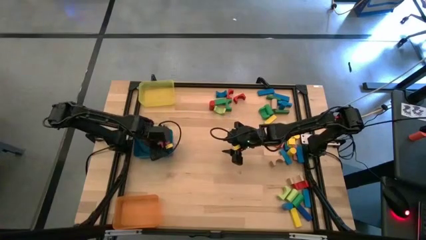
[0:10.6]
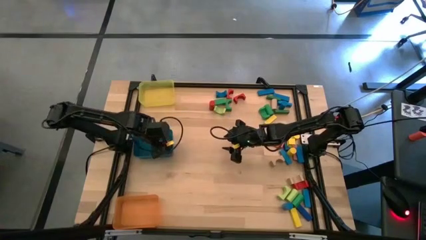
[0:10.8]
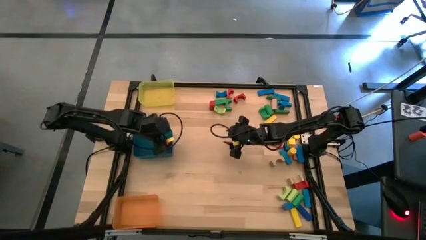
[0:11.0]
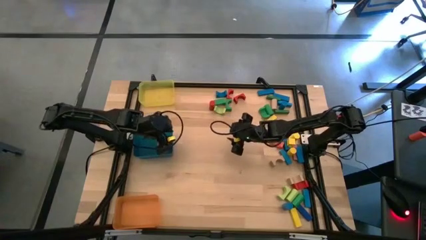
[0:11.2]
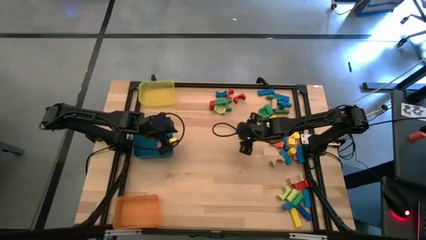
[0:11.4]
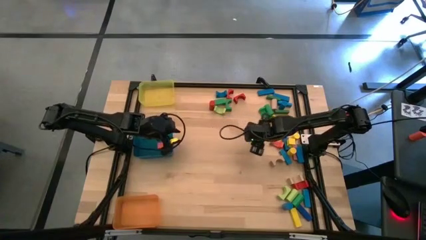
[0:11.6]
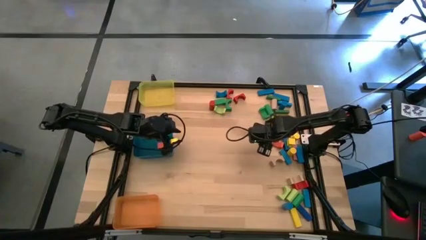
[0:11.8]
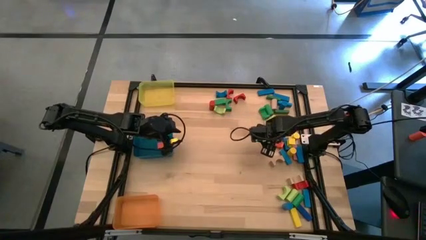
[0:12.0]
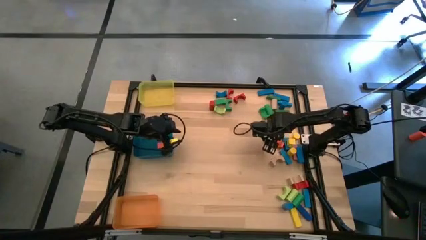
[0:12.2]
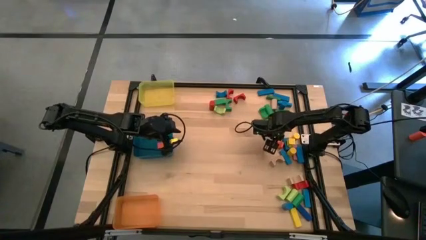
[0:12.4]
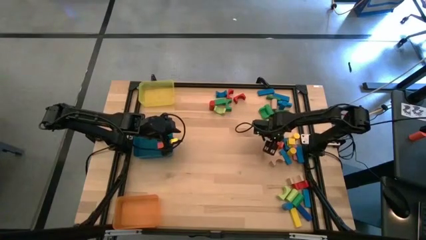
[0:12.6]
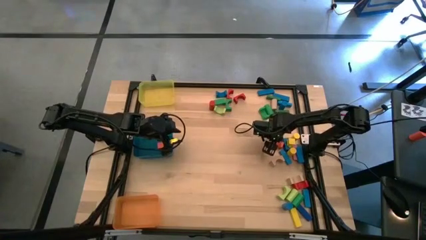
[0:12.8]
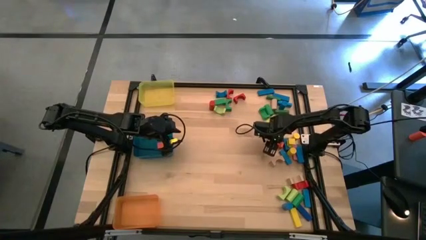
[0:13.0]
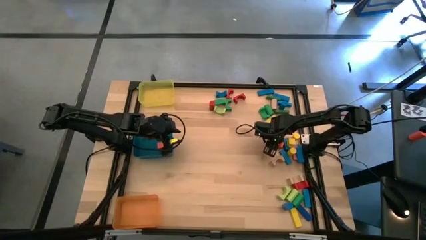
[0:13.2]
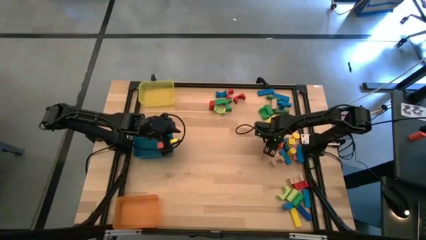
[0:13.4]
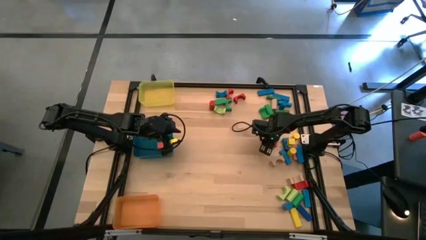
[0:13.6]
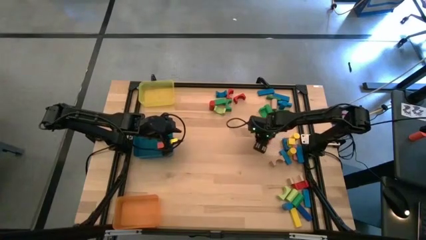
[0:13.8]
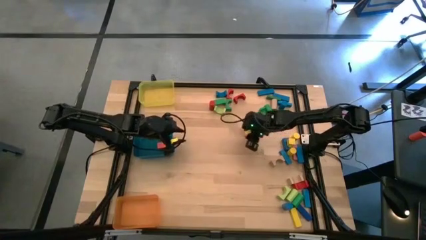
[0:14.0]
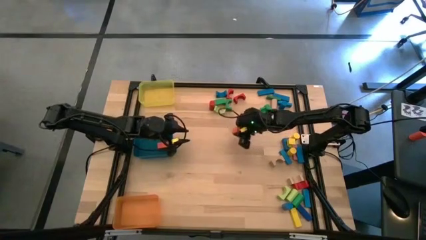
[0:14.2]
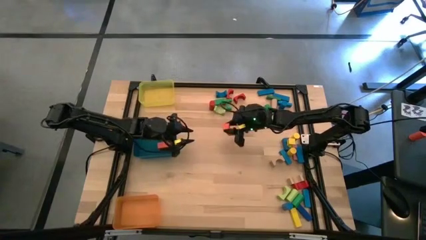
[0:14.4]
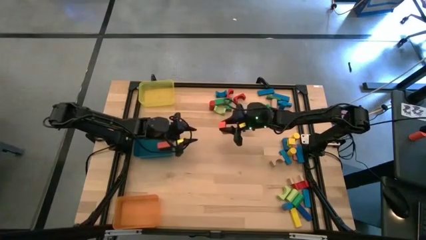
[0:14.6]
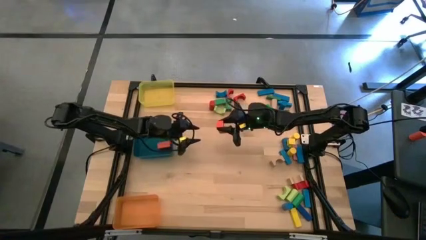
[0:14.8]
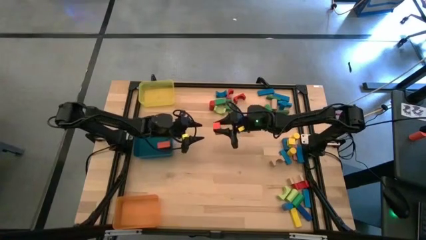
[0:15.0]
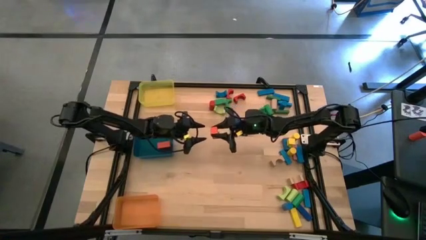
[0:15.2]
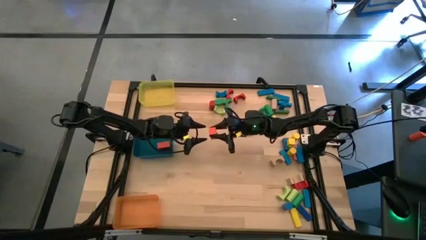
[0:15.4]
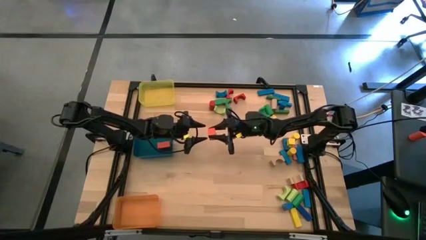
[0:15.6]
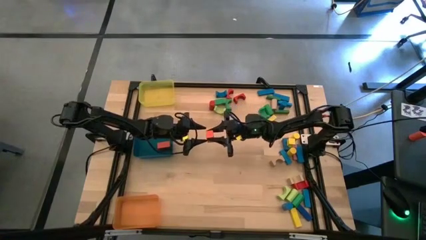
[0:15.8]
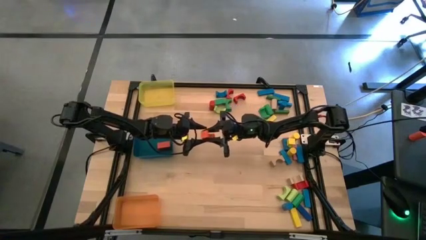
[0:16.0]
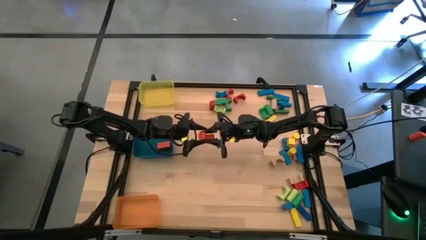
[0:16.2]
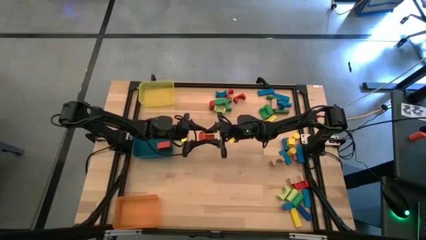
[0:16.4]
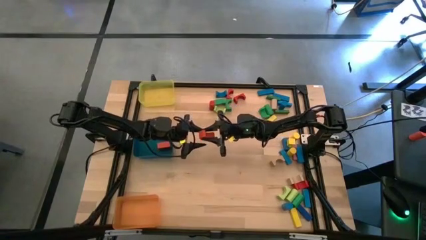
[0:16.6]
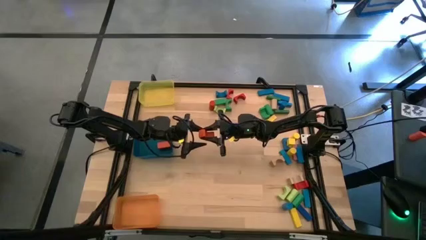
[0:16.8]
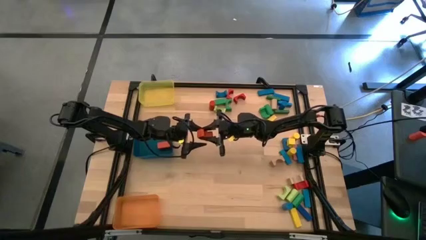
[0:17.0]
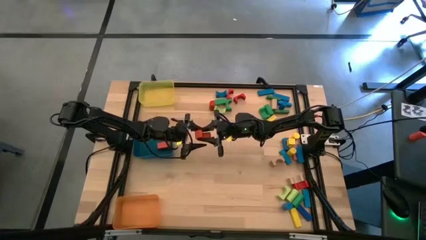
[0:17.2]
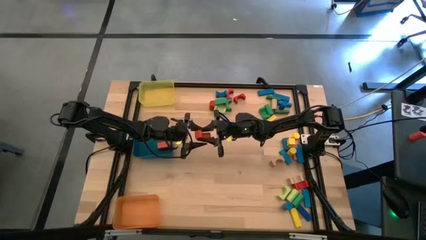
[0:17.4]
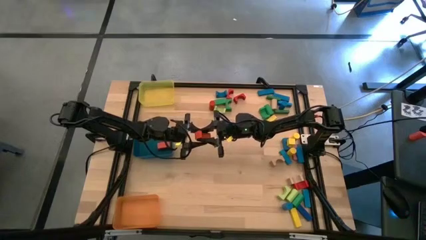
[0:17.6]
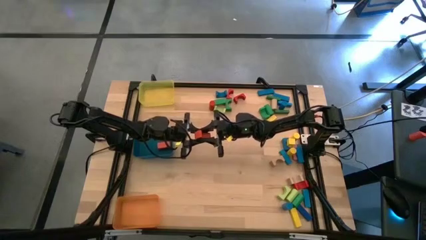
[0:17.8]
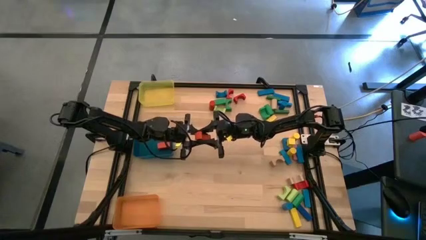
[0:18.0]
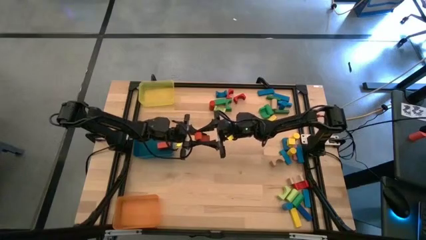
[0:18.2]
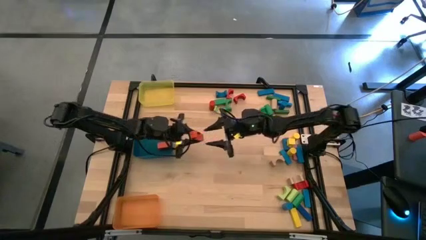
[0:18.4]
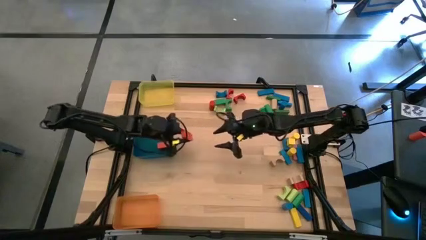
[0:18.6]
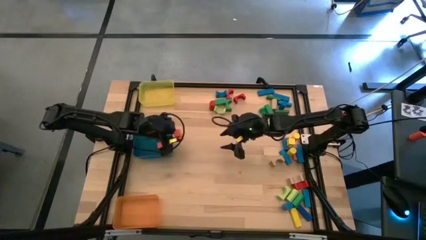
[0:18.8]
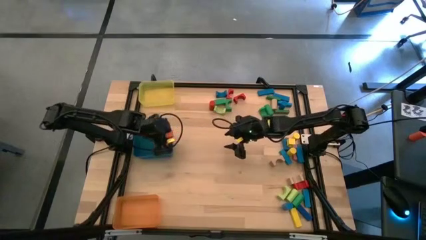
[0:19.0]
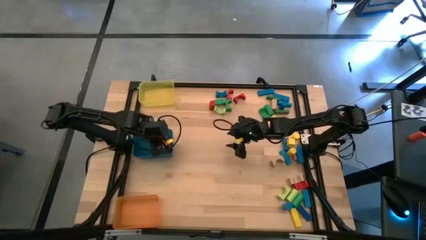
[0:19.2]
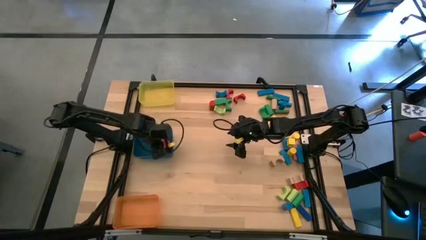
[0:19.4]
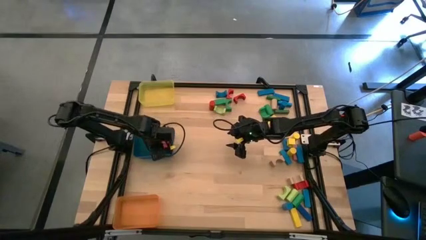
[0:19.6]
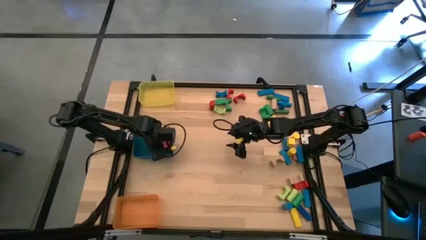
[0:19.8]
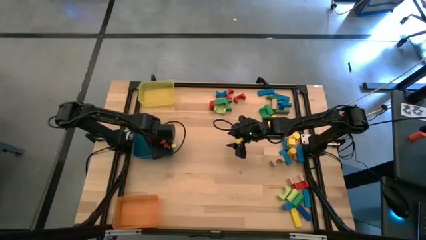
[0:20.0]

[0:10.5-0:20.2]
Task: Sort blocks by size
Put the orange arch block into the blue bin

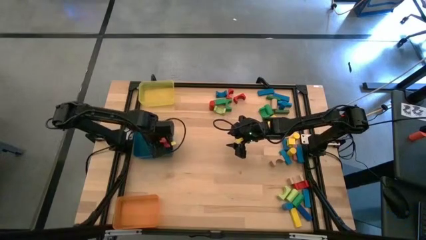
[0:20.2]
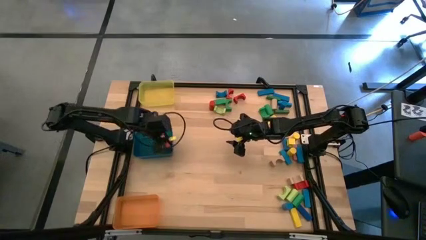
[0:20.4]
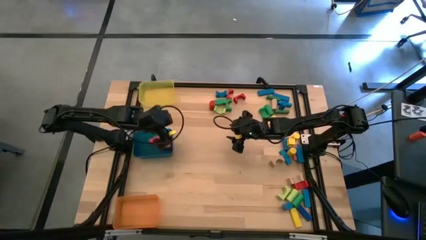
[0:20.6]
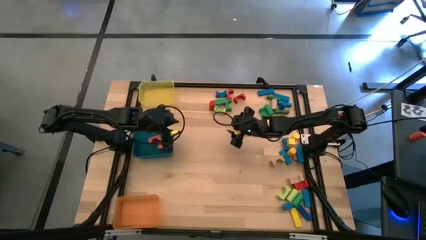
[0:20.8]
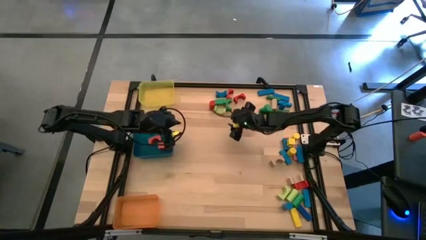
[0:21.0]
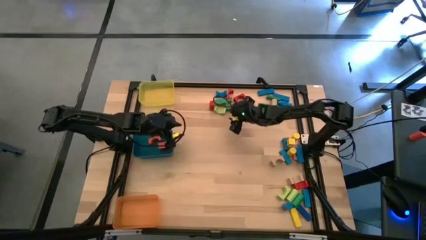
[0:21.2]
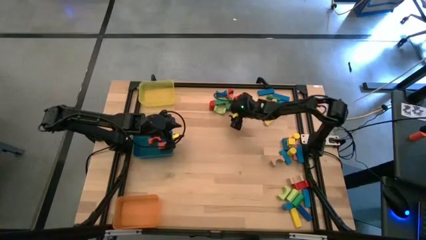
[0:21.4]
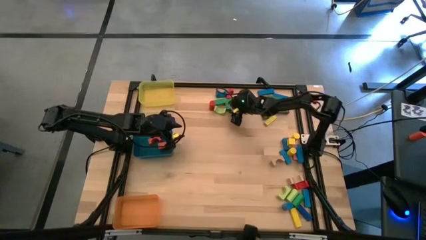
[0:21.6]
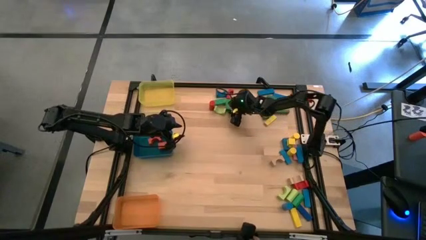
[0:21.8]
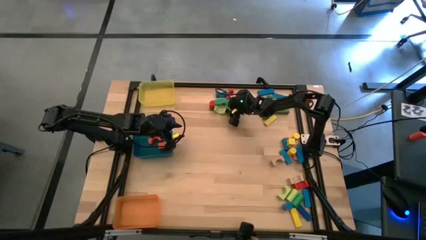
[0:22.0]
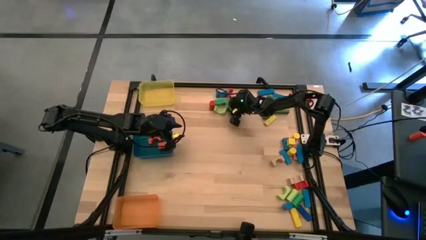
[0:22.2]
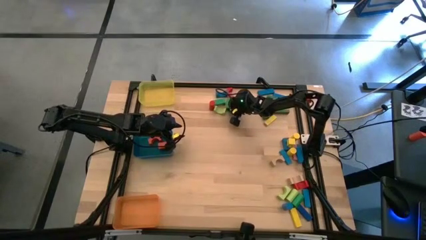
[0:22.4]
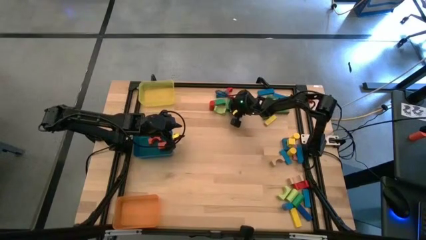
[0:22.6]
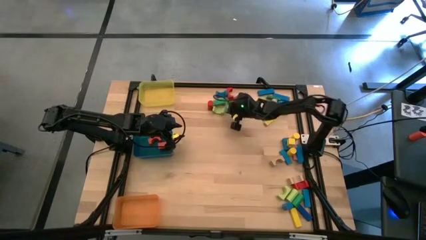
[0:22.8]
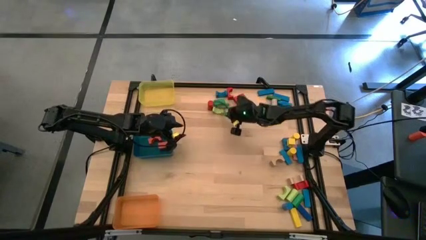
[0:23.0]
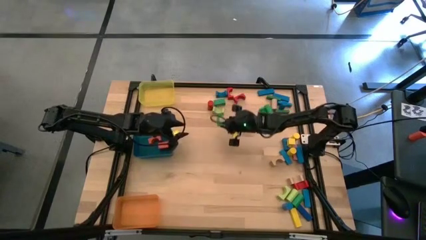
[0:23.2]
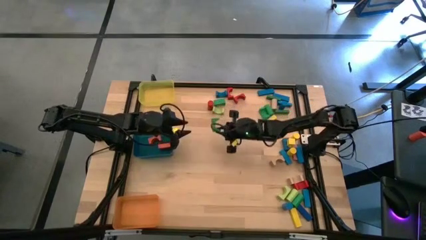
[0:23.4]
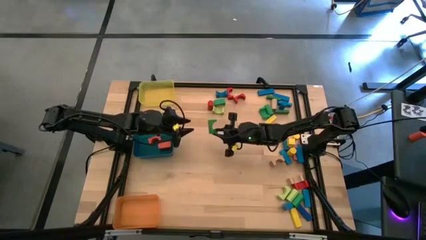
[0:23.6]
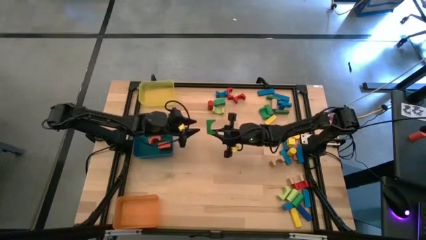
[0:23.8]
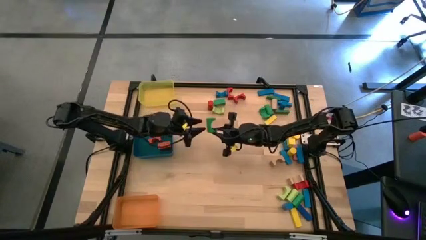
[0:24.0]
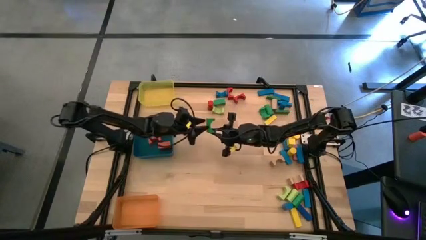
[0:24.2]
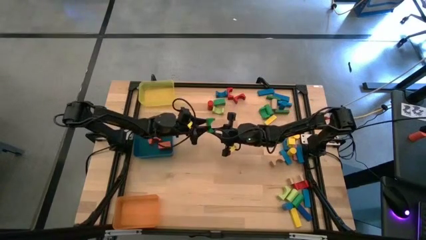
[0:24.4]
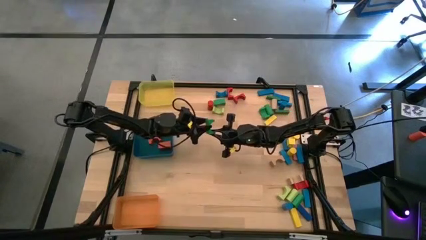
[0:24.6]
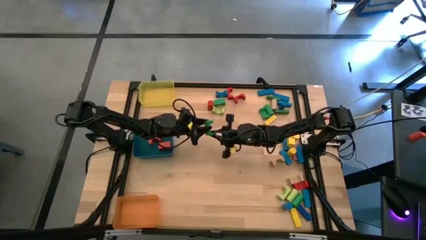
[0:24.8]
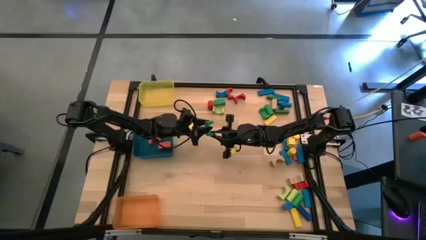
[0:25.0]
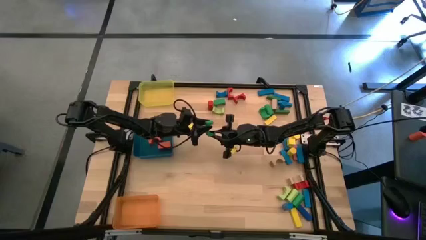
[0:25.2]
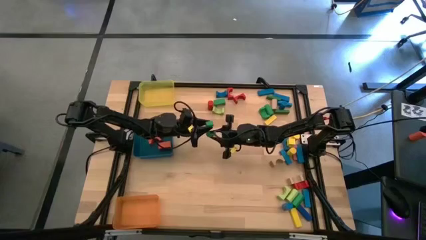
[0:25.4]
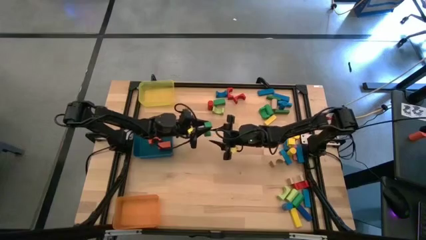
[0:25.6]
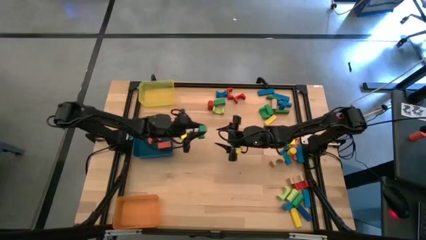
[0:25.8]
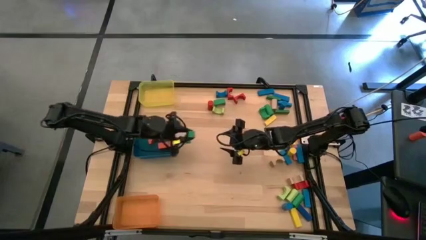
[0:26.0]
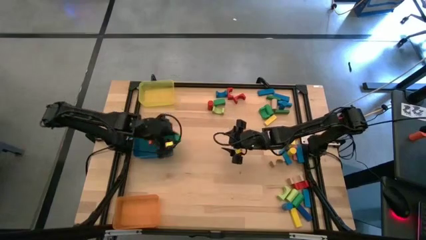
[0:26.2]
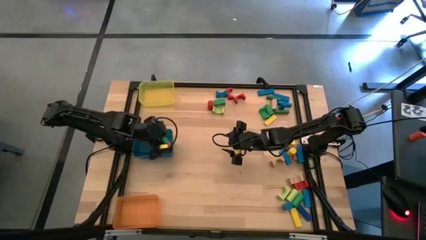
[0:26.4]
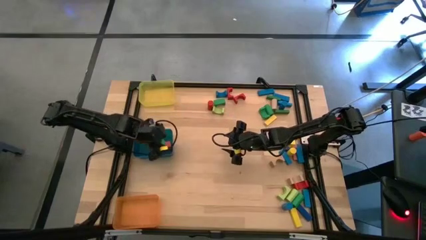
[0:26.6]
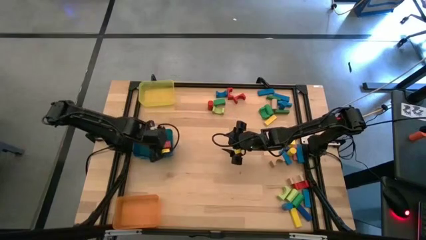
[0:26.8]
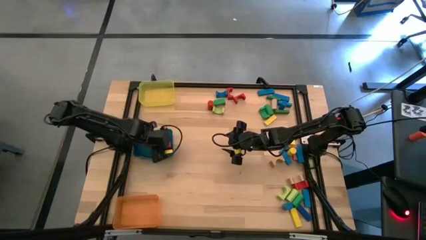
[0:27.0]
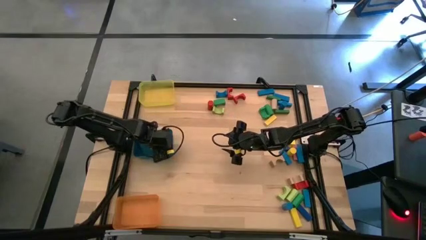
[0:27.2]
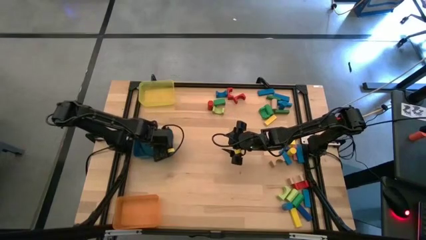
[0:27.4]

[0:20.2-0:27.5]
Put the green arch block into the blue bin
